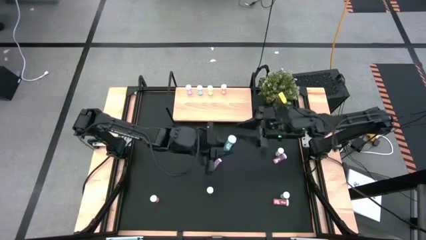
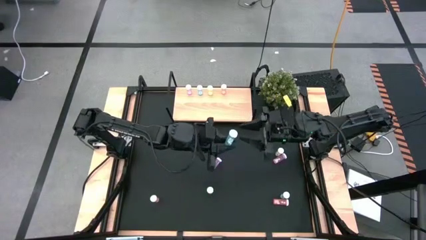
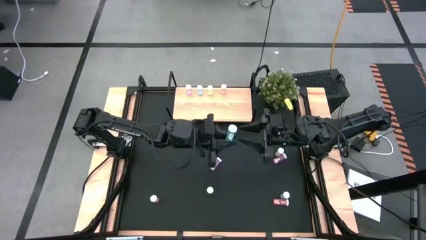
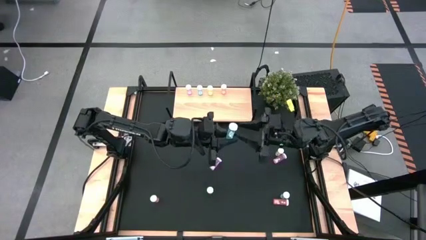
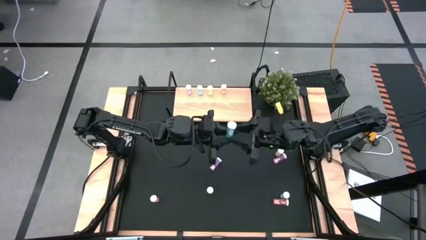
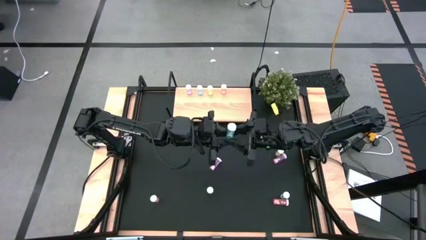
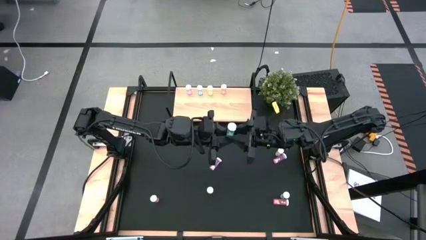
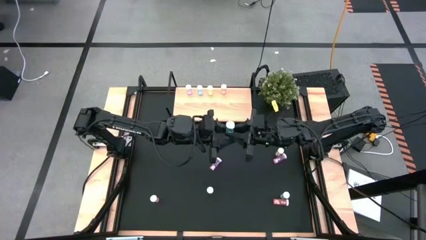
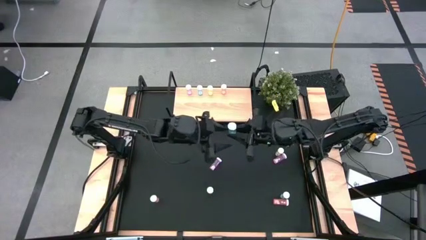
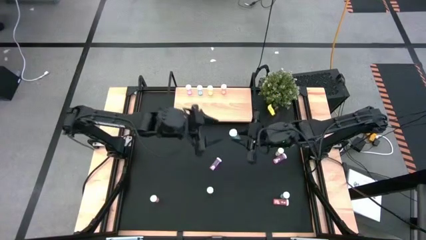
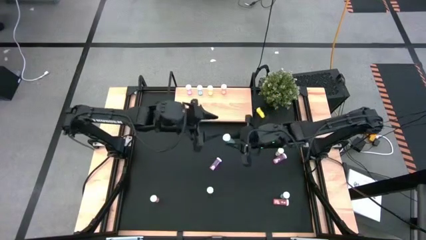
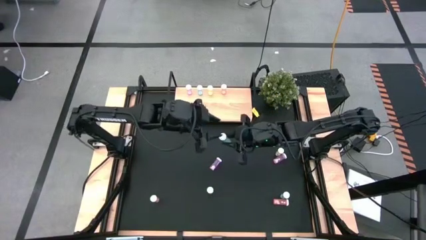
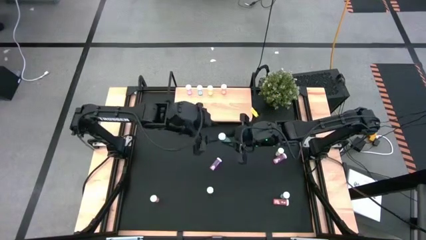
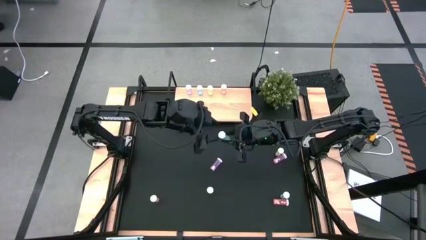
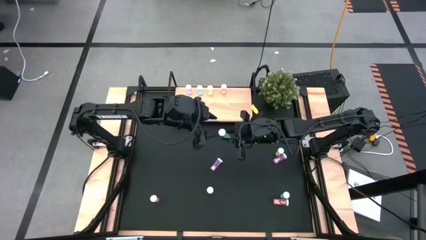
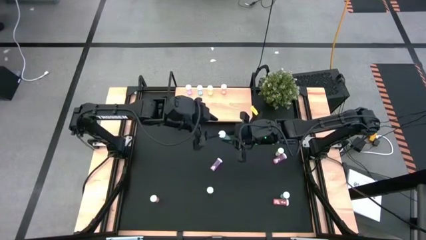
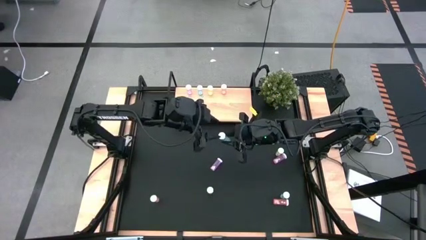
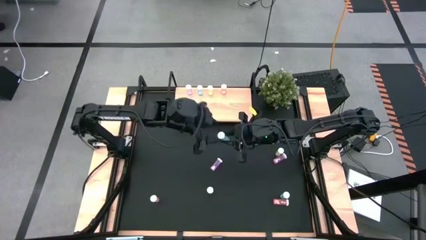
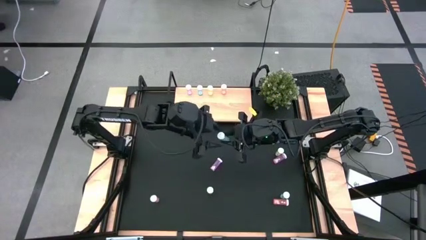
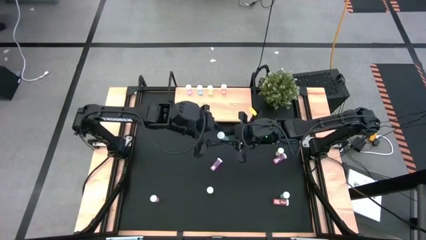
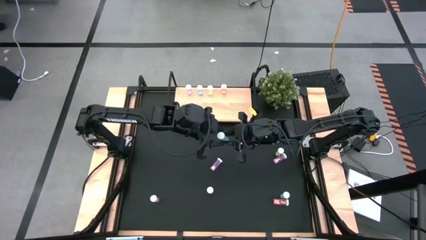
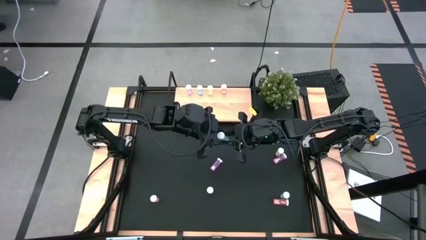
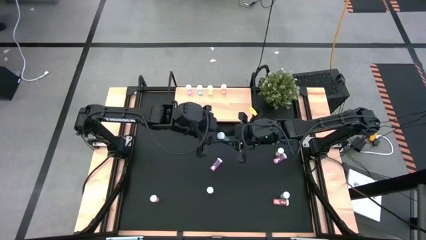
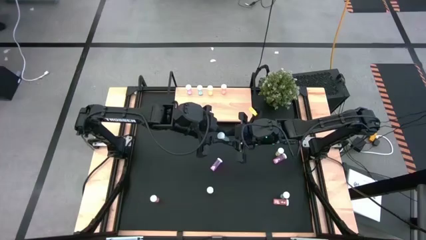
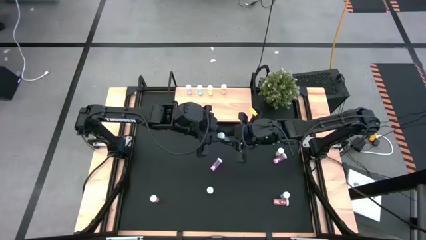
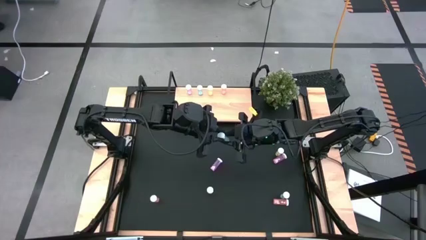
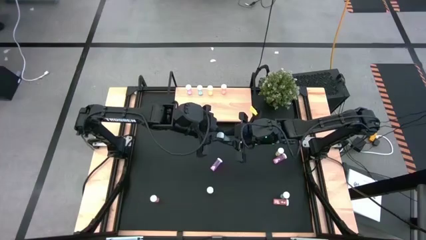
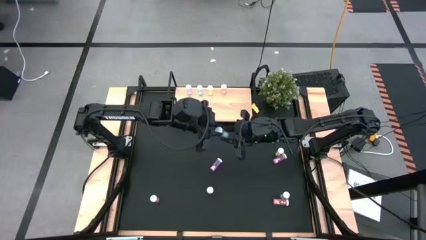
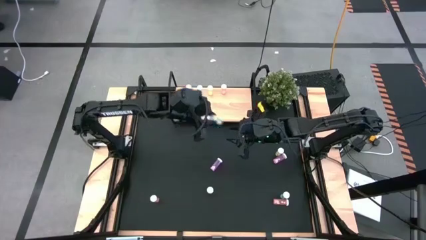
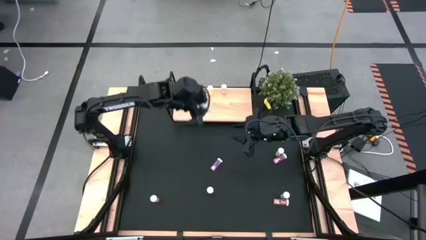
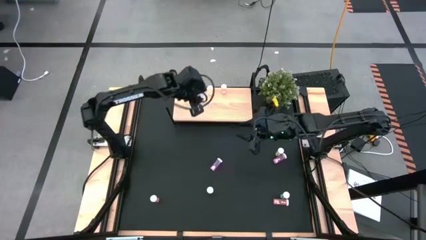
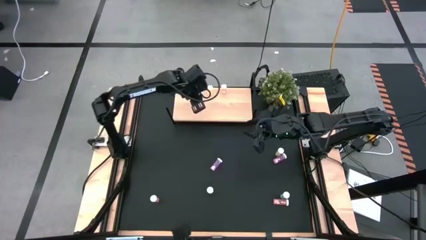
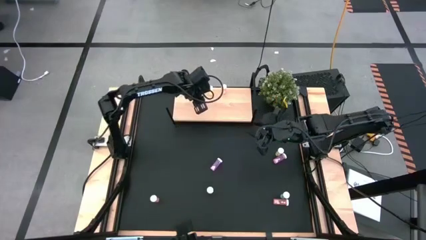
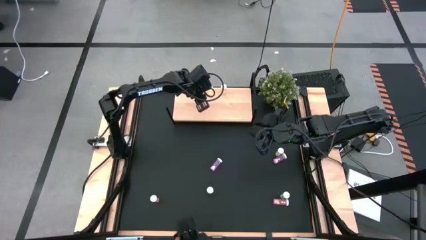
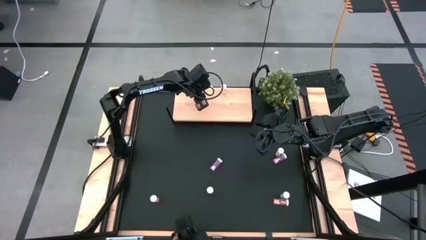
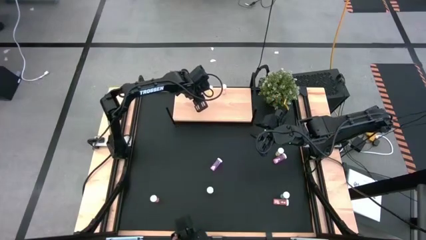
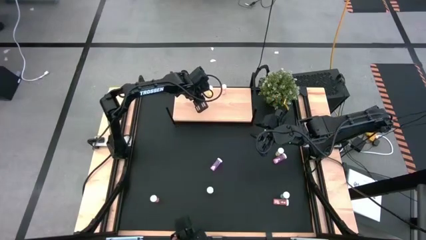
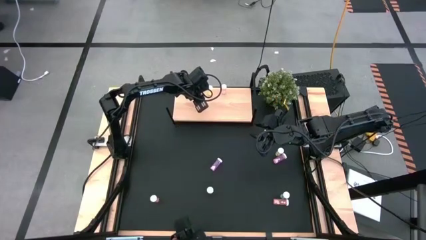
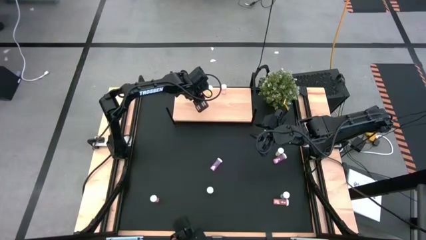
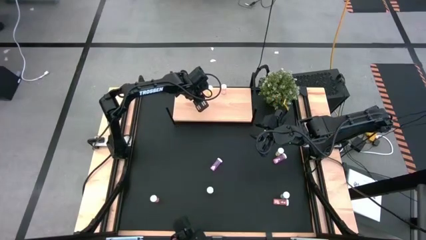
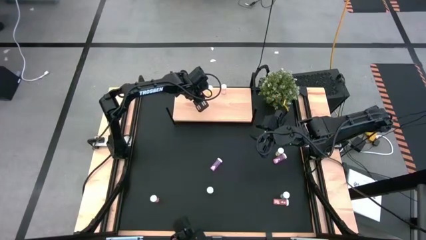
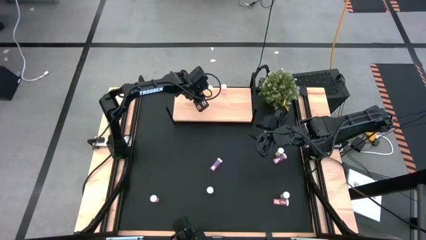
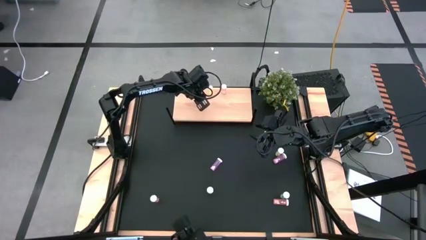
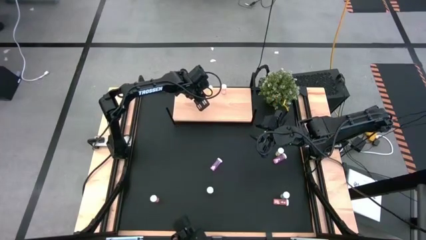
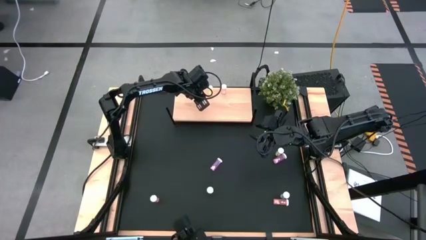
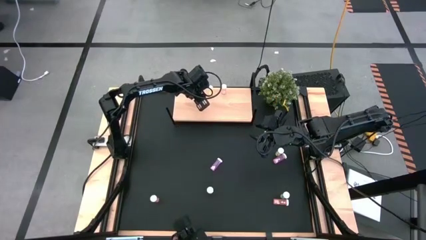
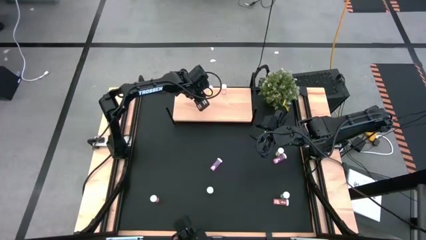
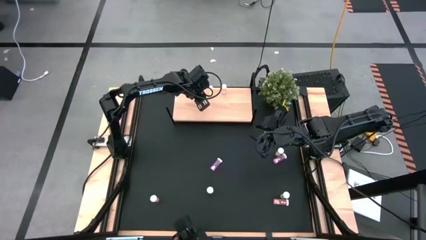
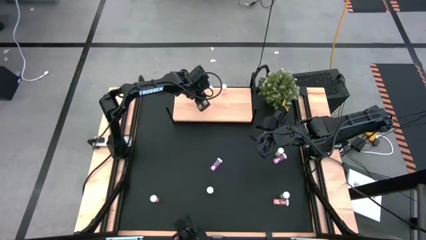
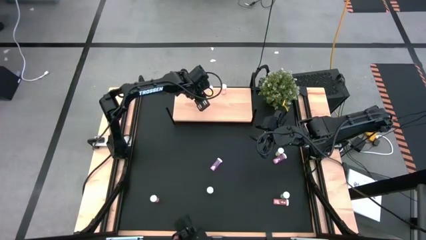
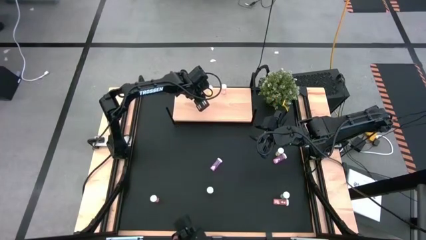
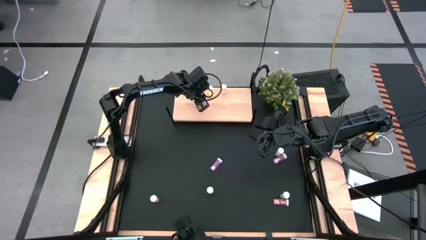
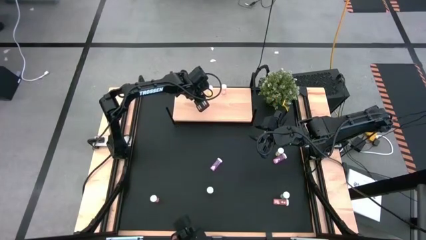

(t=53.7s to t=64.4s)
Task: Pick and place medicine bottles onto shelf by color
Put the left blue medicine bottle on the shelf aligned with the other blue medicine bottle

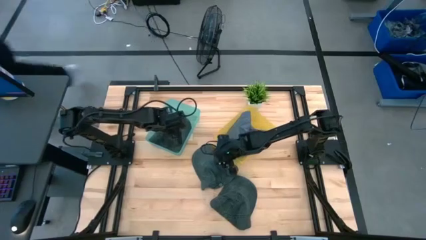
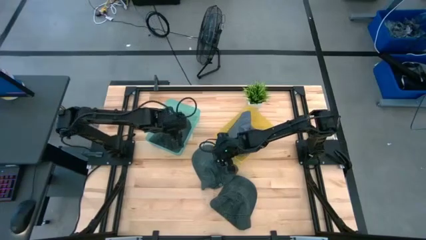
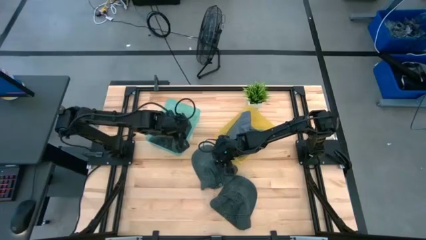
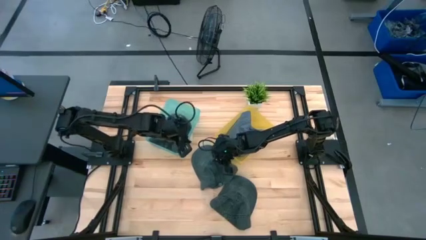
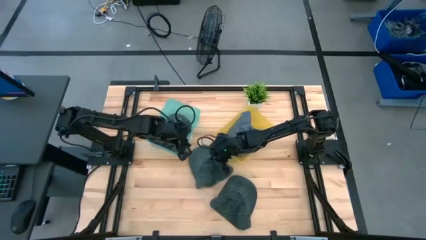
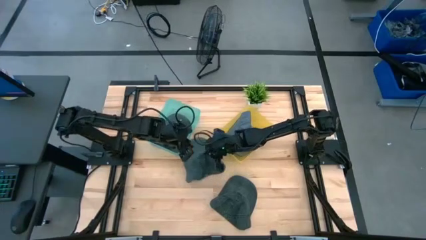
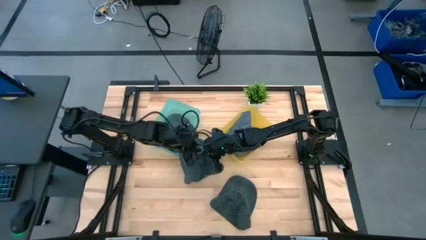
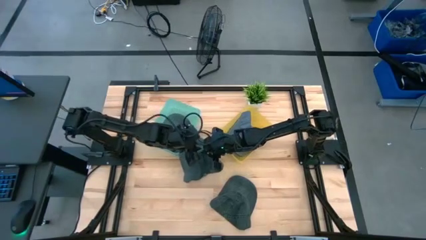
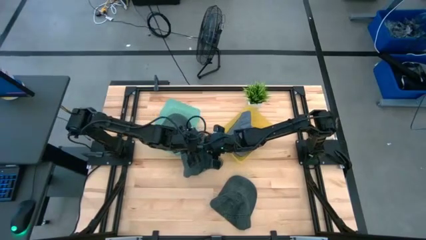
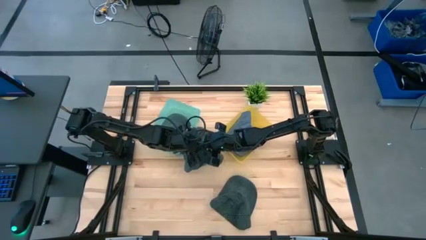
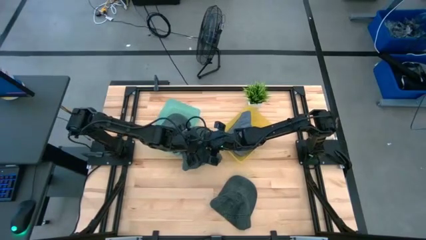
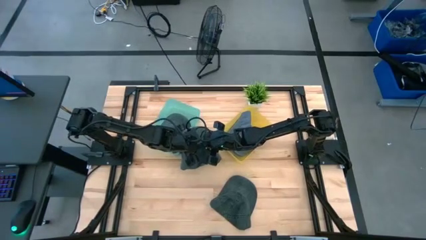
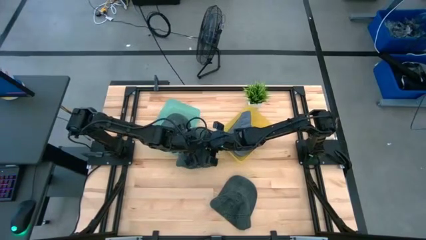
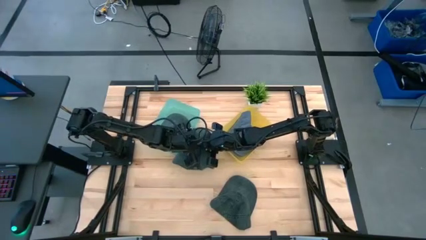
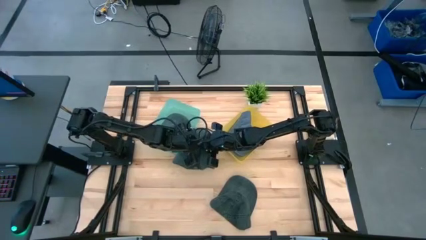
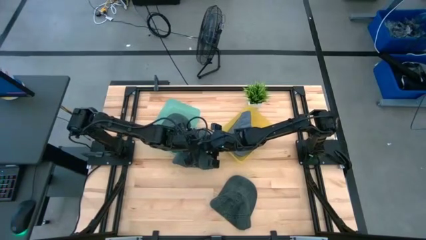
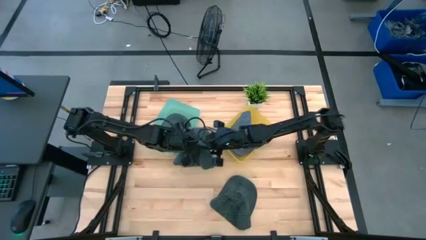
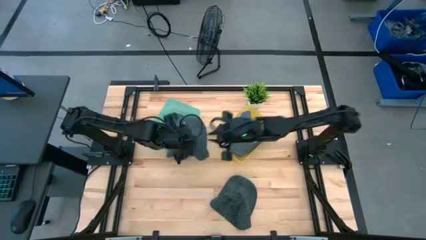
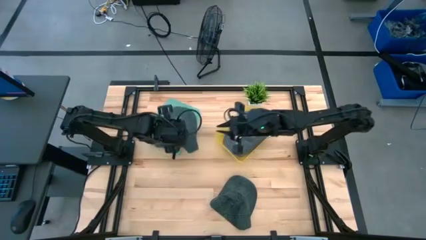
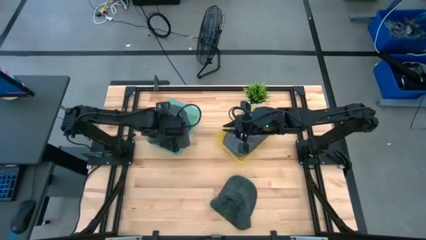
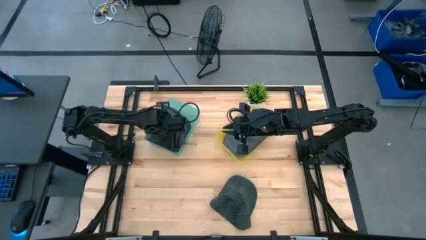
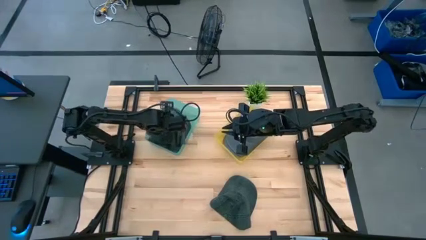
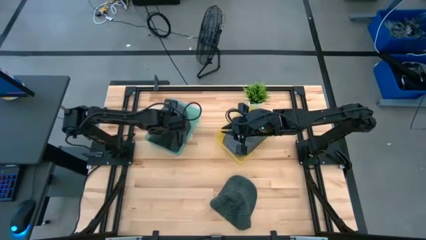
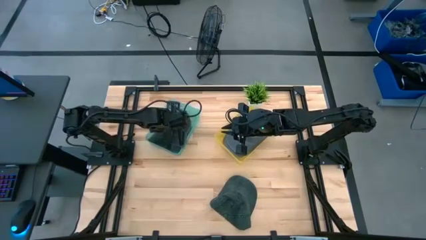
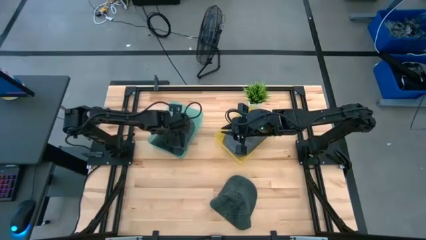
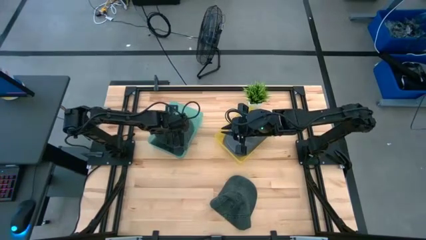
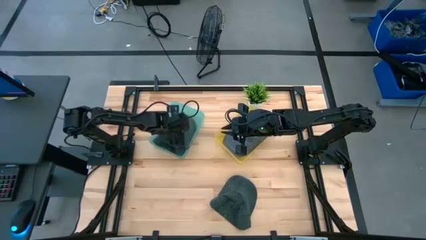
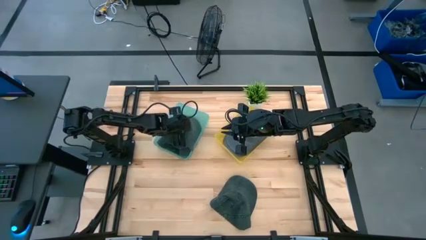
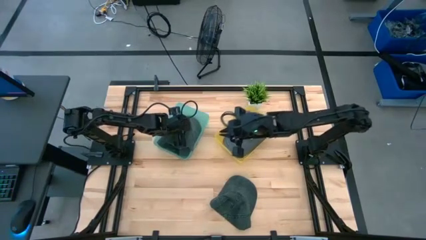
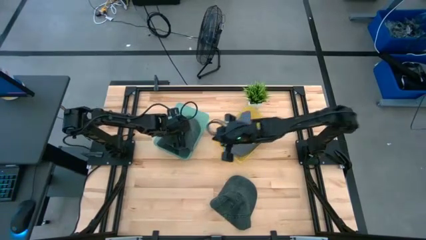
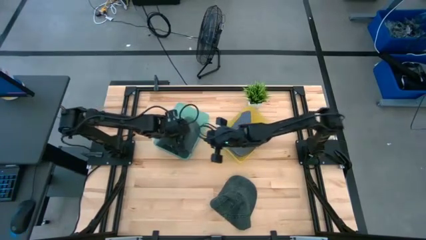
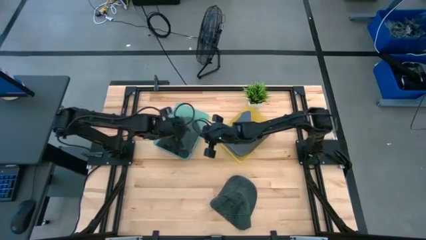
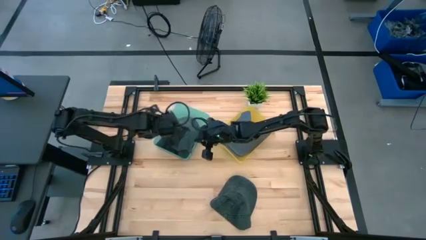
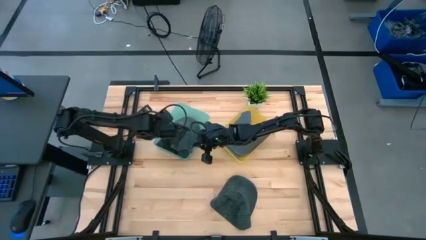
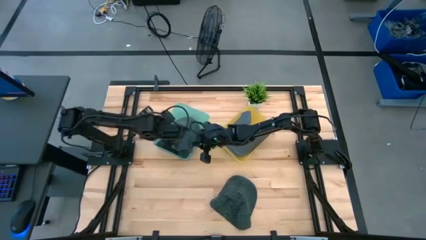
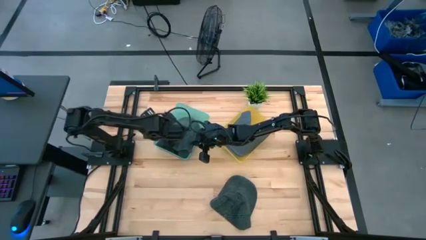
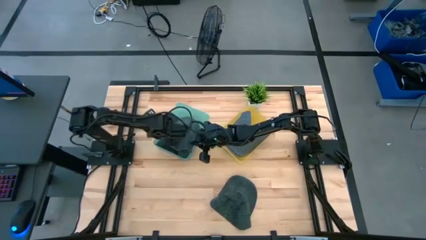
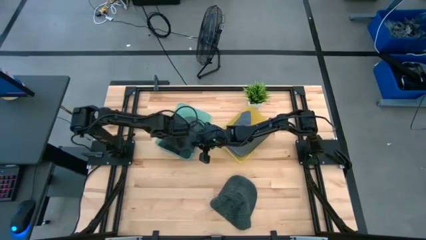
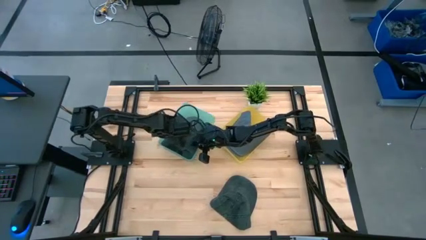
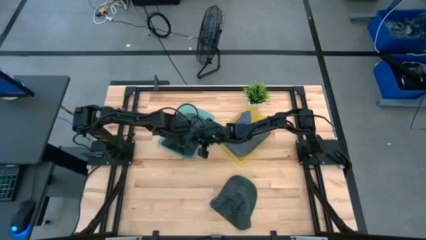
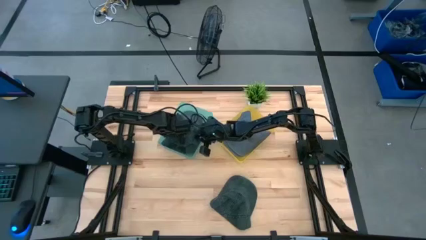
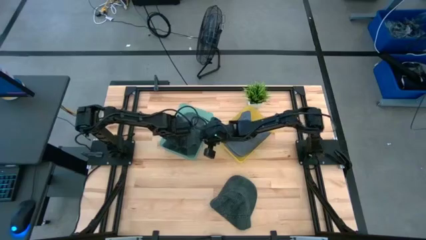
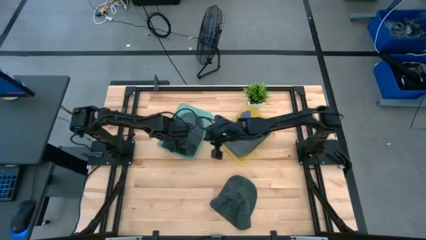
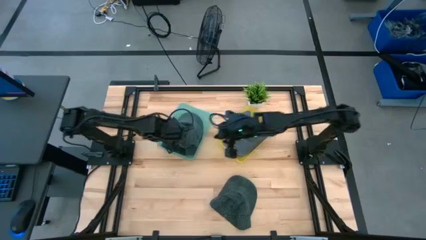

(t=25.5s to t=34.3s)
Task: Pick & Place hat
Put the top black cap into the blue basket
